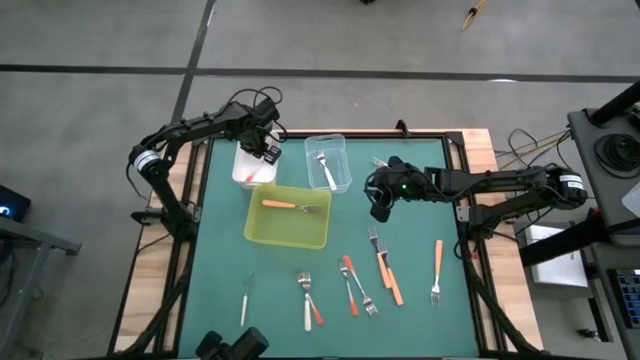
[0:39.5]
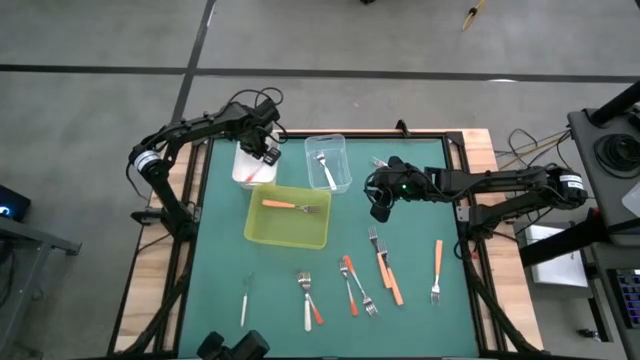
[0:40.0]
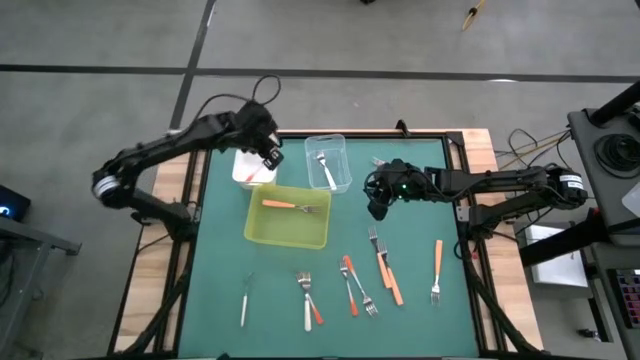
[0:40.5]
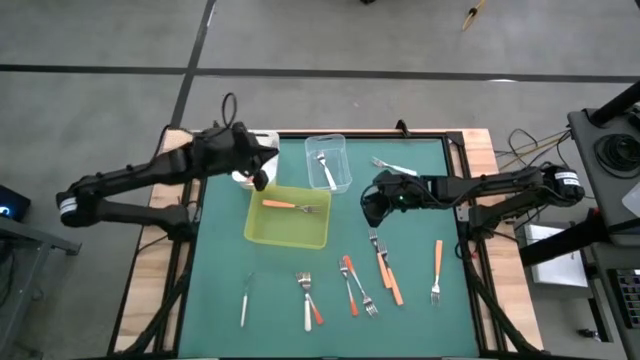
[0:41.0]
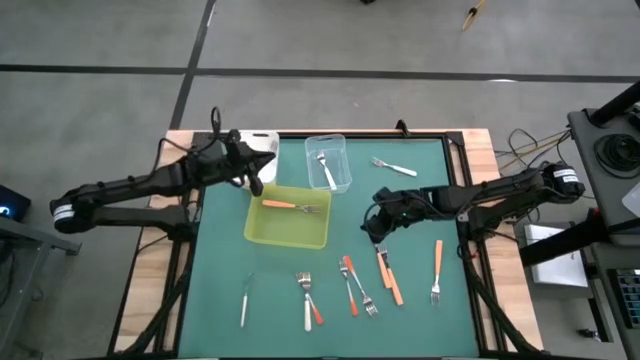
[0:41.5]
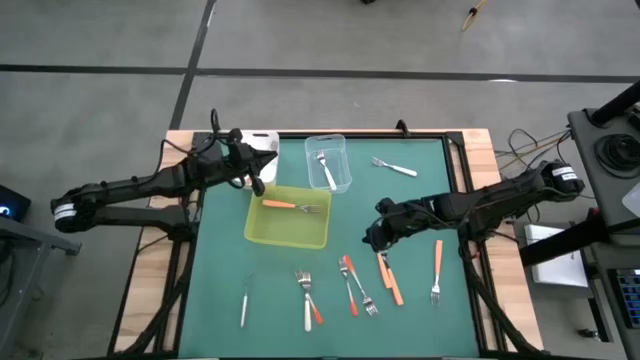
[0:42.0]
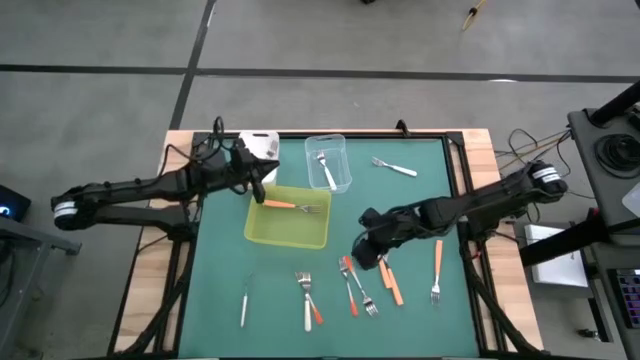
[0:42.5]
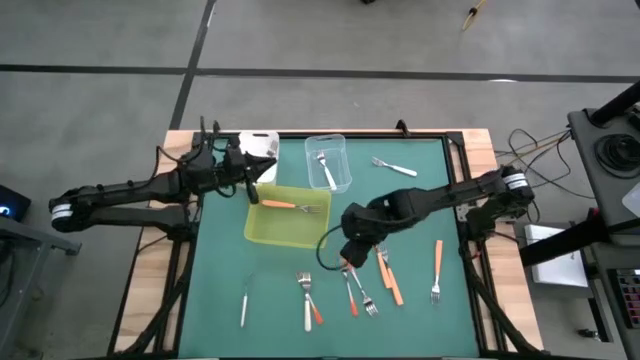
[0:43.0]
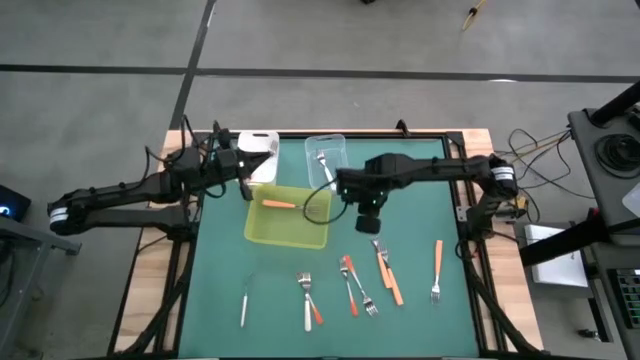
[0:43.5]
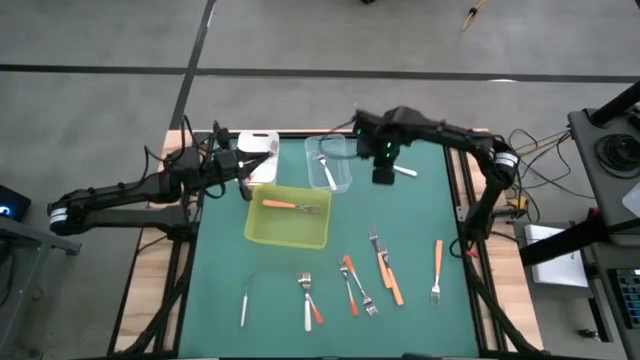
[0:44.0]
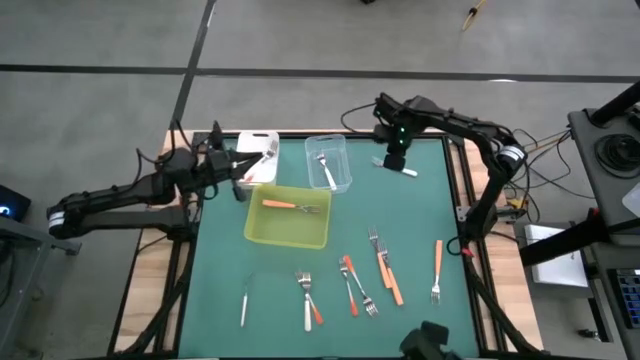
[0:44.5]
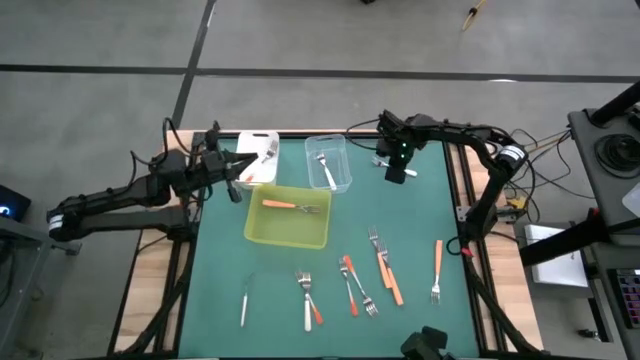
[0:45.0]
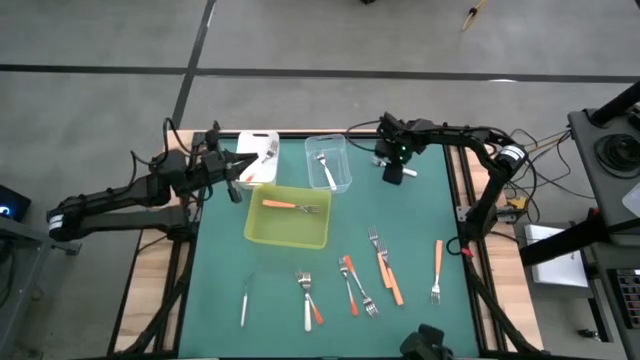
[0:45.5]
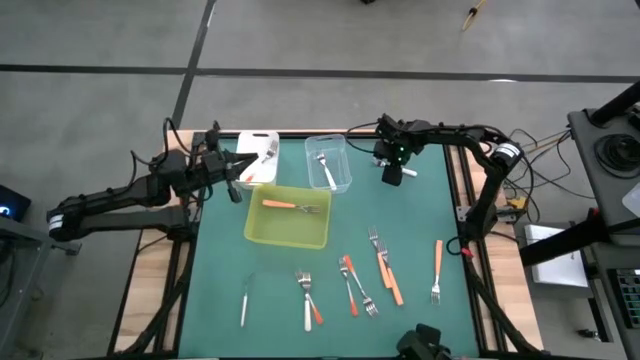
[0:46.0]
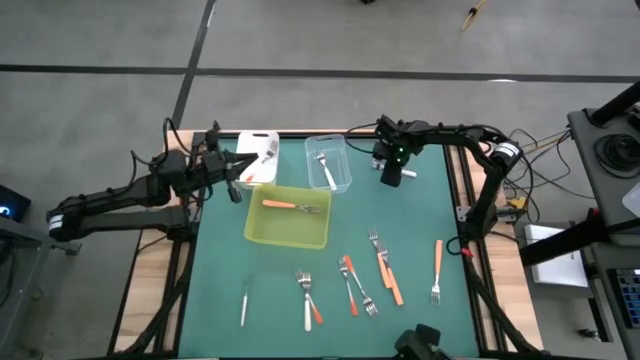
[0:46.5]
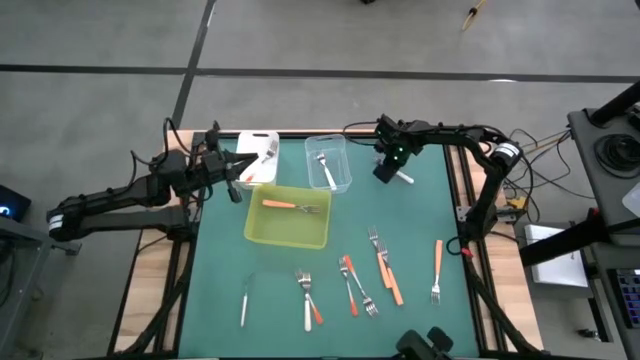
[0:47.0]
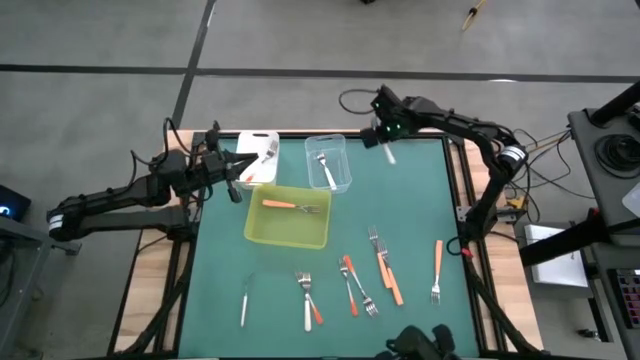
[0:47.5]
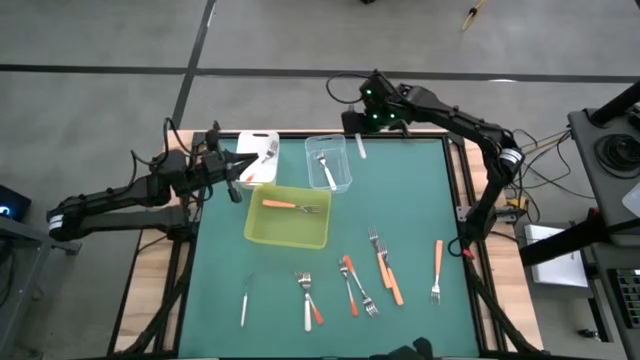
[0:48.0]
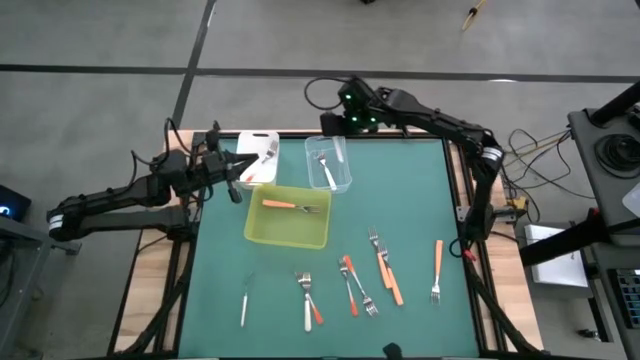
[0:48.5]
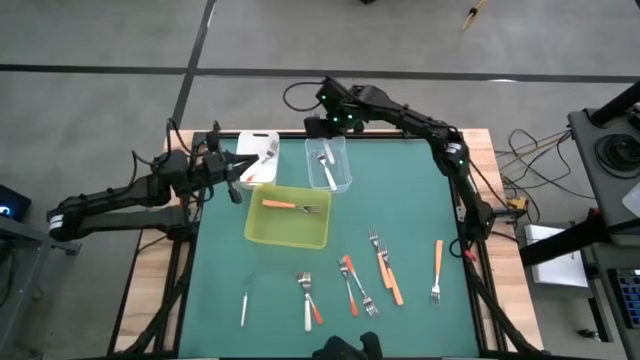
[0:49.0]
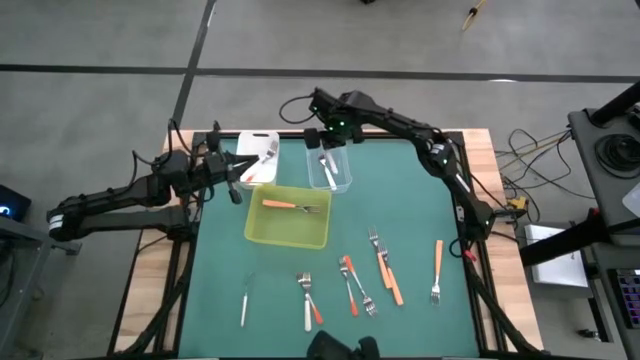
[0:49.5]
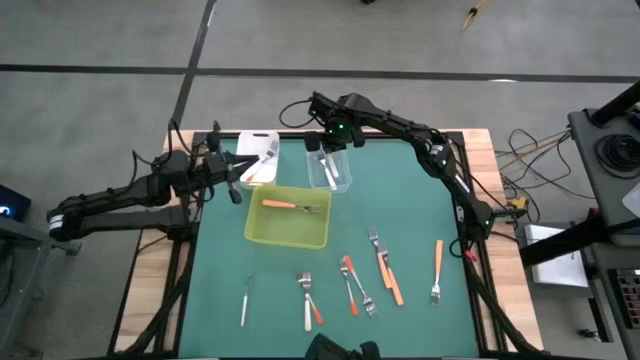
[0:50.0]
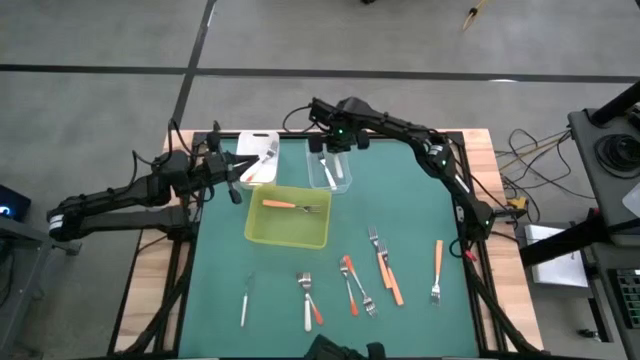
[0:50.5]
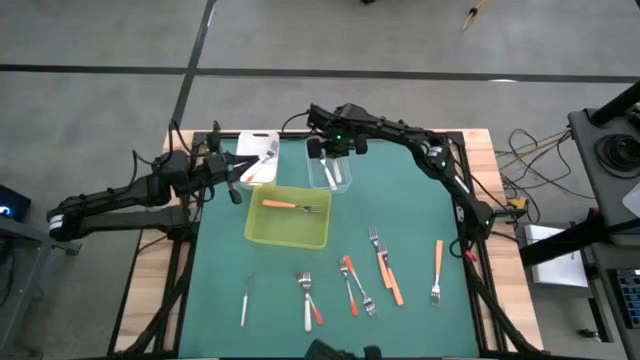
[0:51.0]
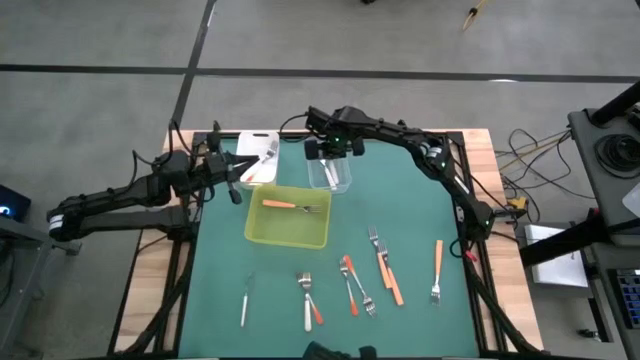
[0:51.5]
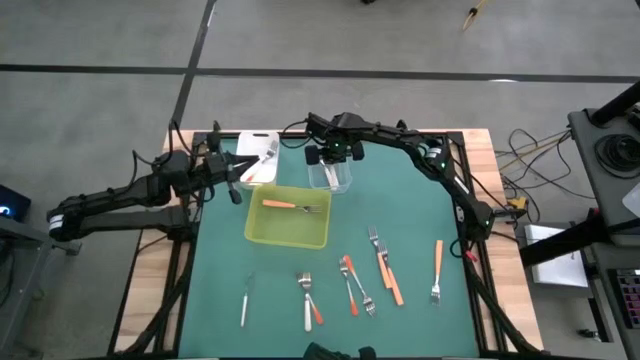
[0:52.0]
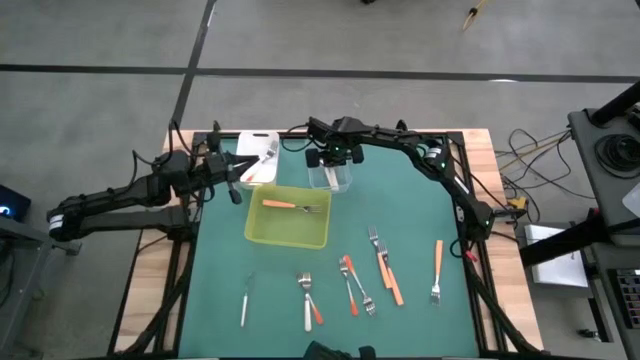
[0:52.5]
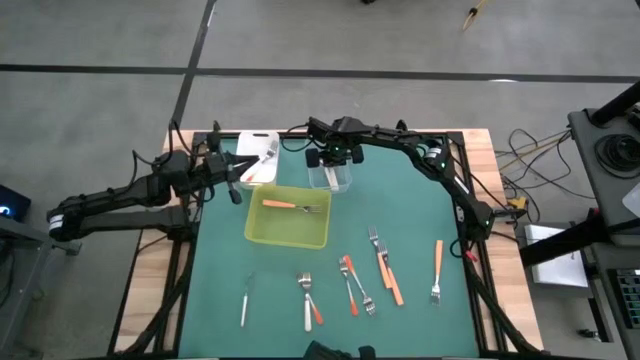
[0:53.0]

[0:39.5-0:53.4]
Task: Sort silverware by color (type)
Put the white fork into the transparent bin

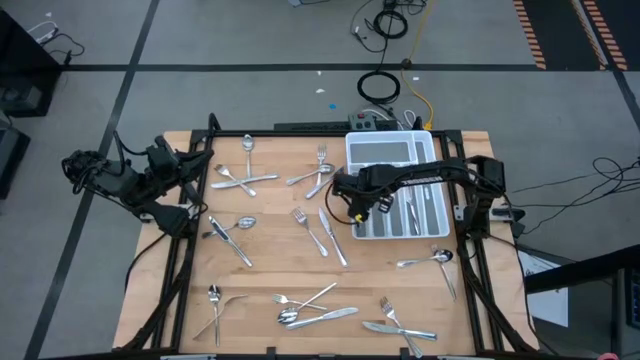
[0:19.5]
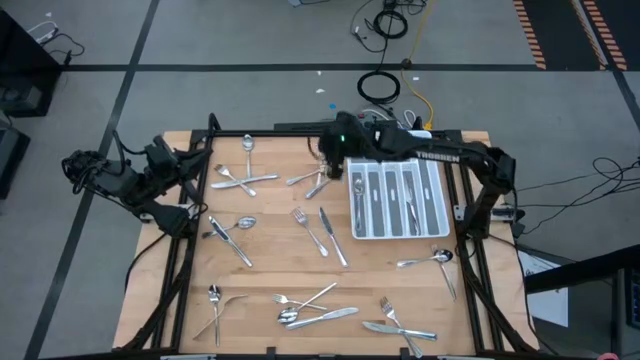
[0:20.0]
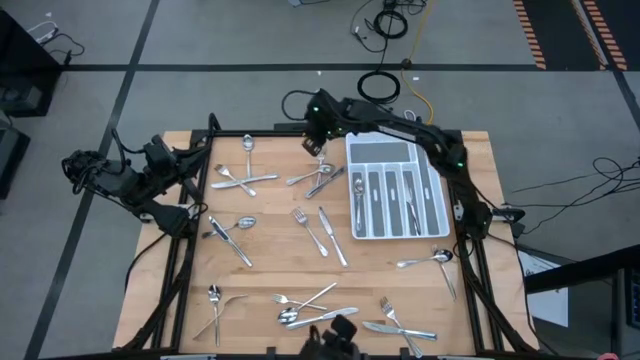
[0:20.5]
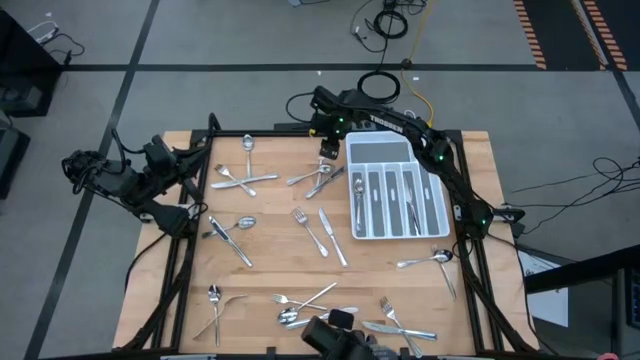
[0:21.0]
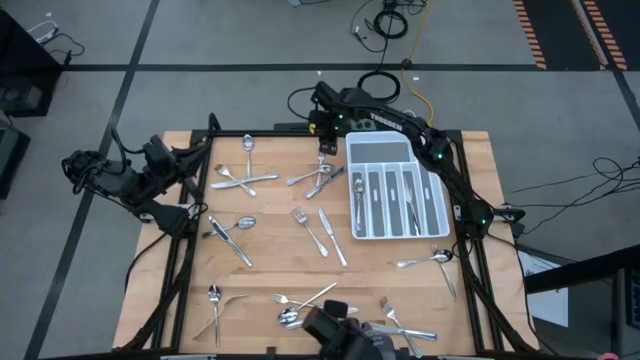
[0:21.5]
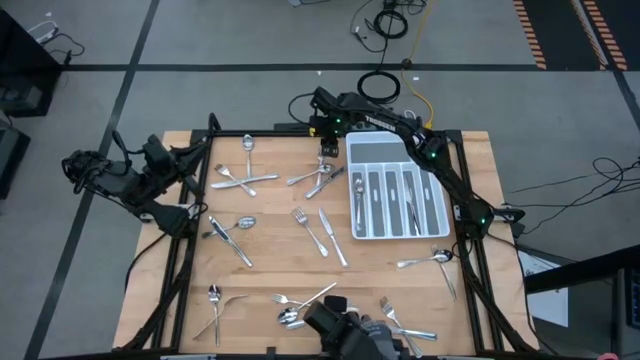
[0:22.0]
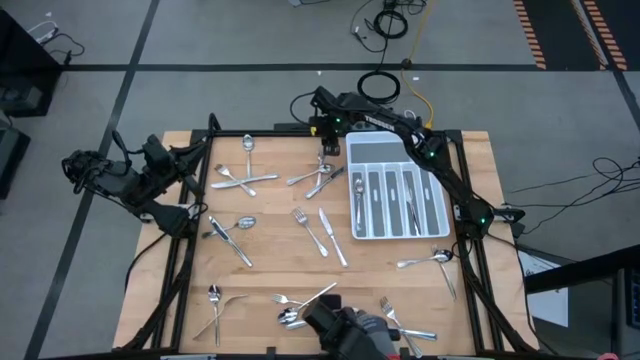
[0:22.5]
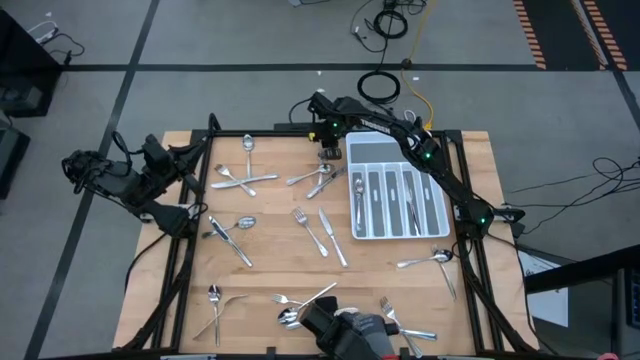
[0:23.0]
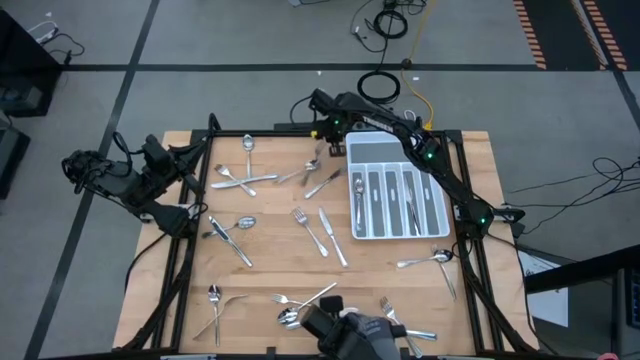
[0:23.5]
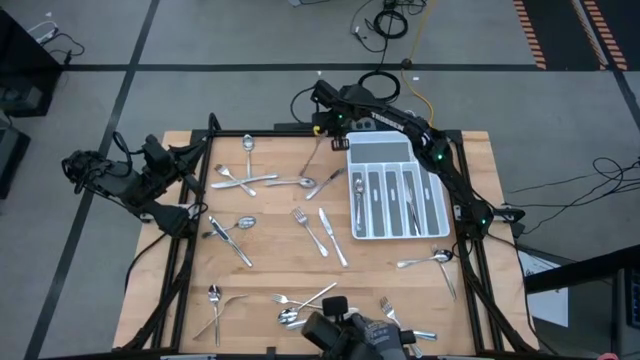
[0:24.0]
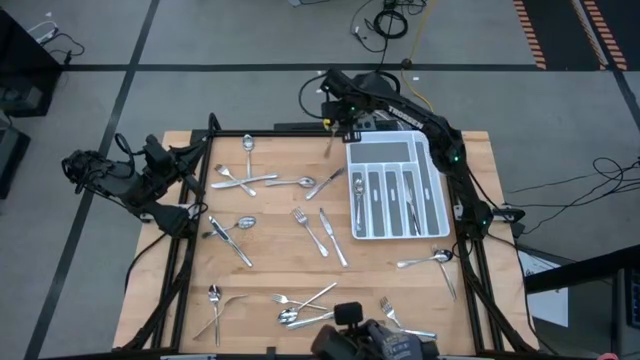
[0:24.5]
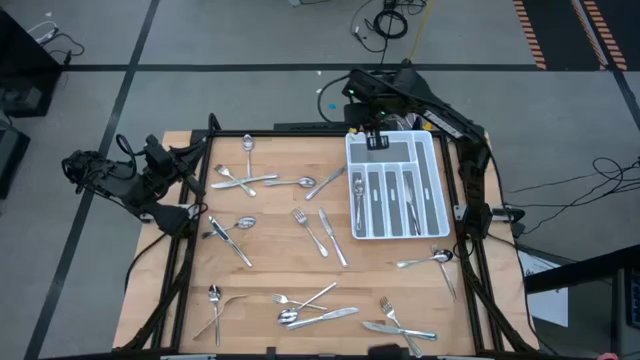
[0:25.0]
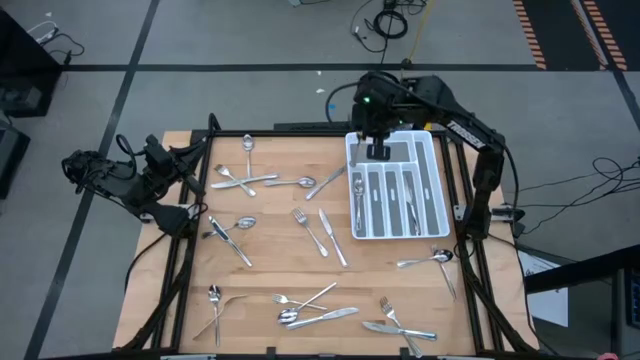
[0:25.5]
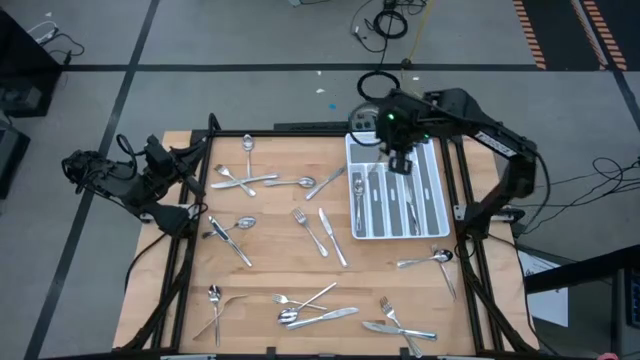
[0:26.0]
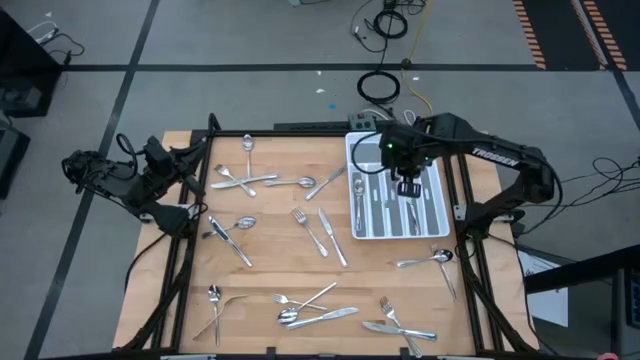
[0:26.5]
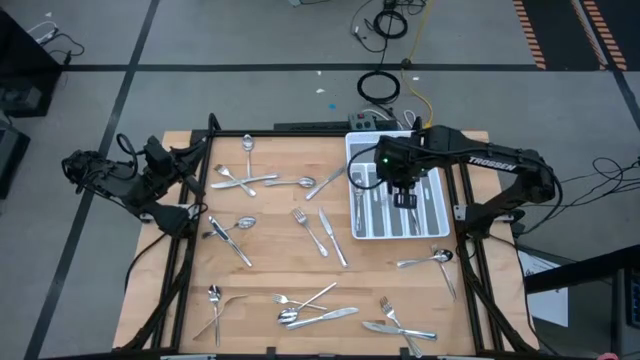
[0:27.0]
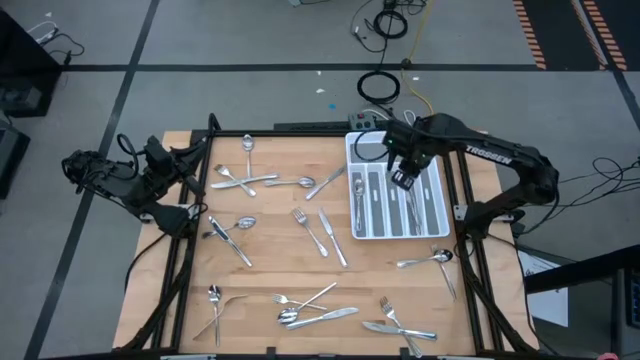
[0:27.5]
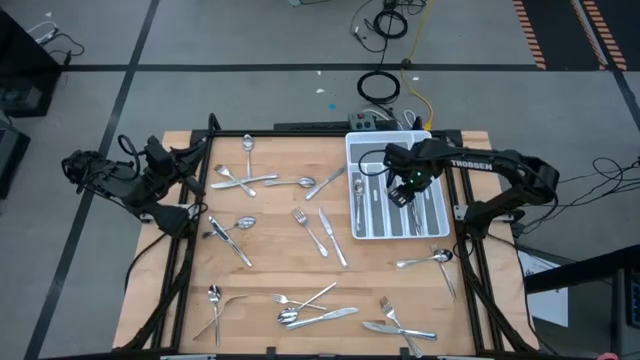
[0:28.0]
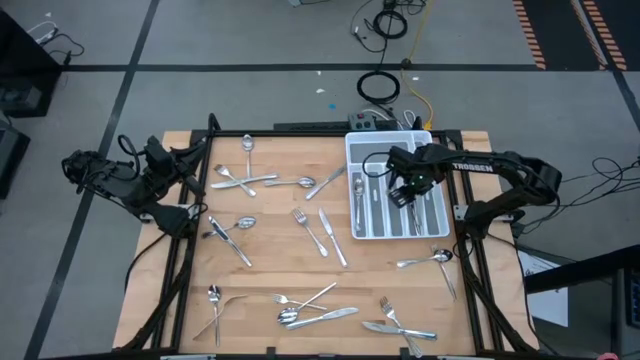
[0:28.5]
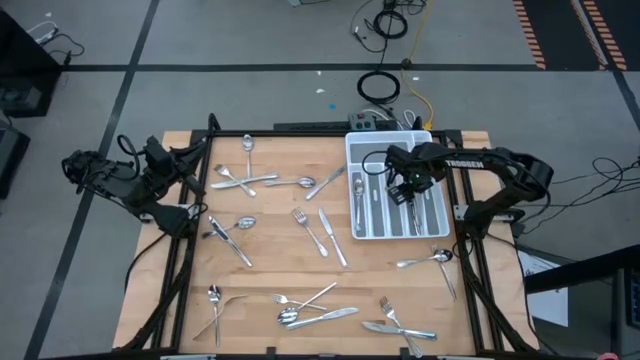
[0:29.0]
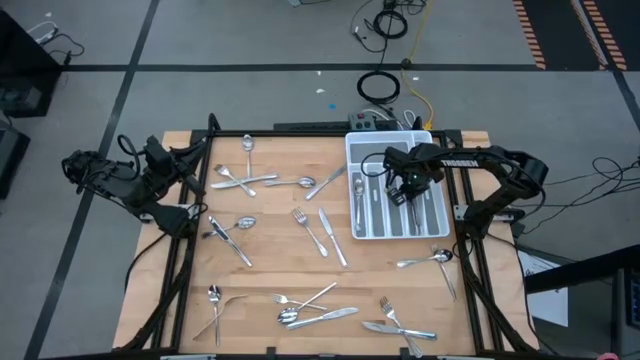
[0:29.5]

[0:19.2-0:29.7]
Task: Sort silverware
Put the silver fork into the white silverware tray
